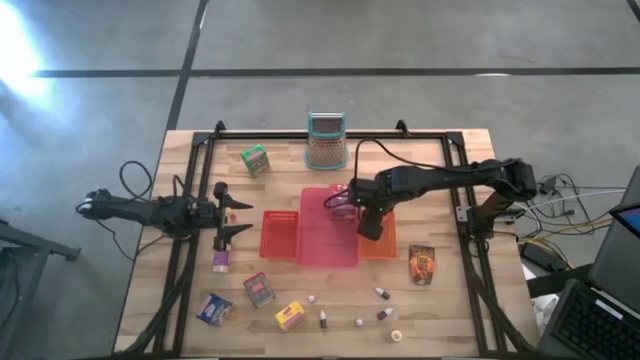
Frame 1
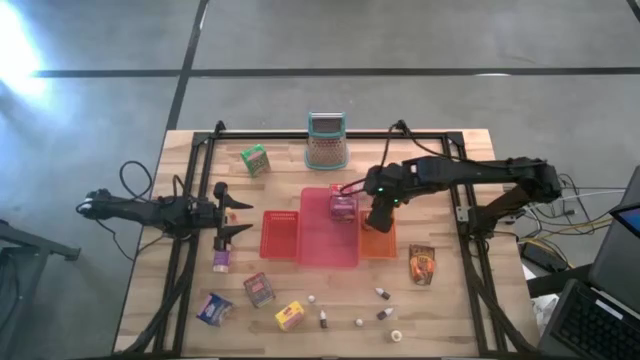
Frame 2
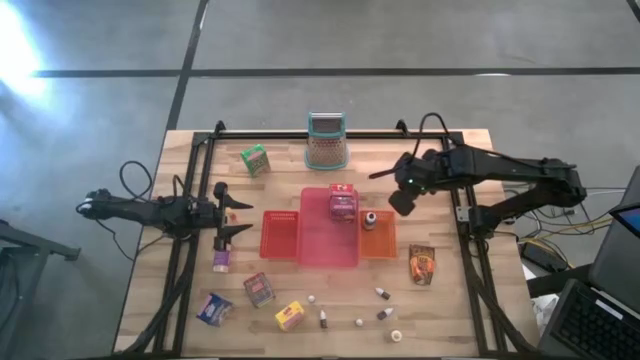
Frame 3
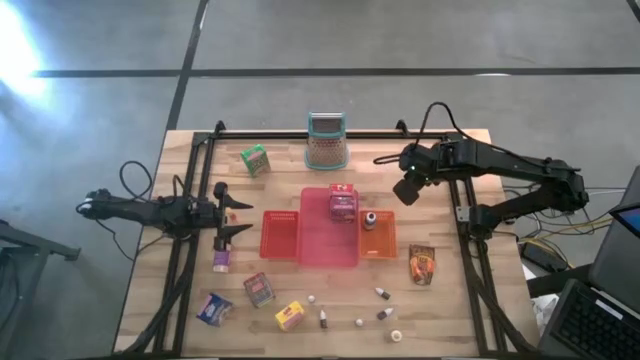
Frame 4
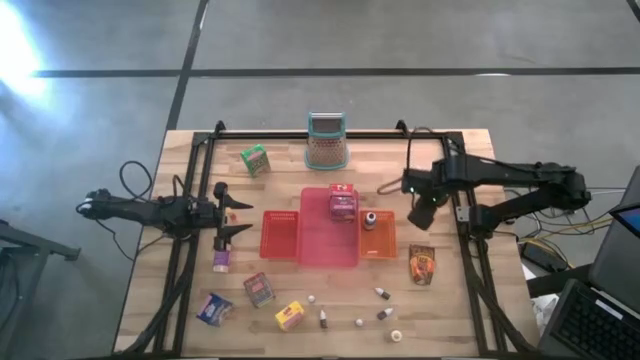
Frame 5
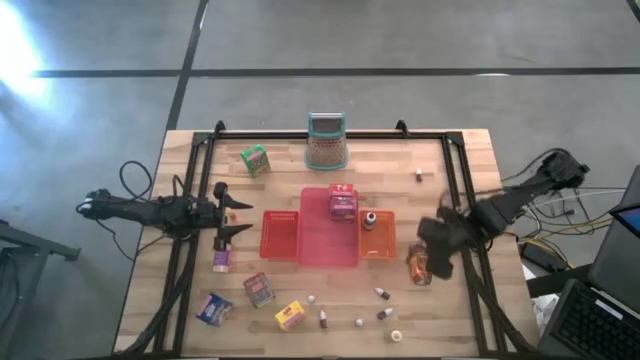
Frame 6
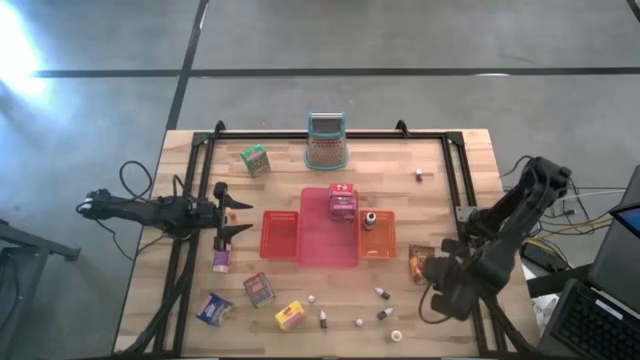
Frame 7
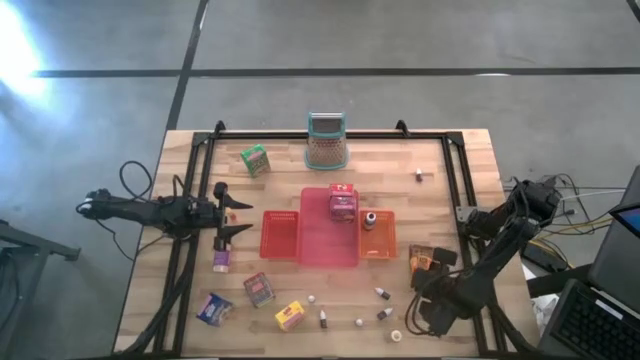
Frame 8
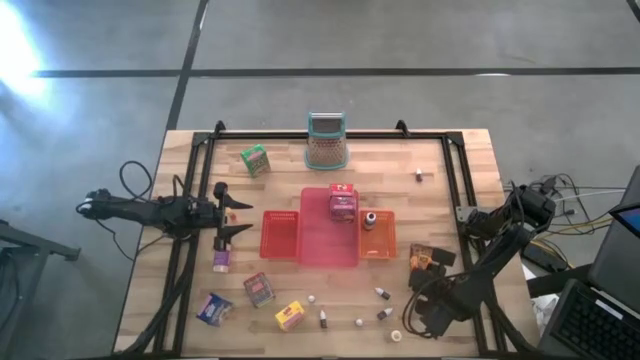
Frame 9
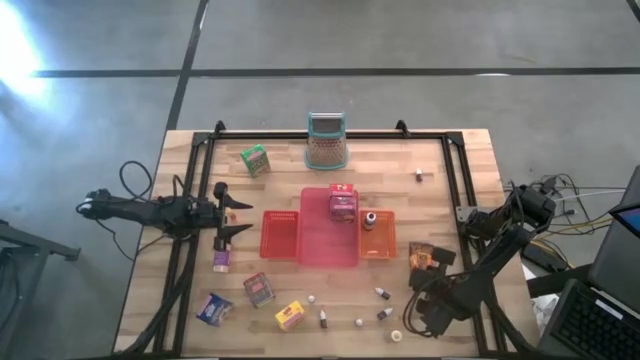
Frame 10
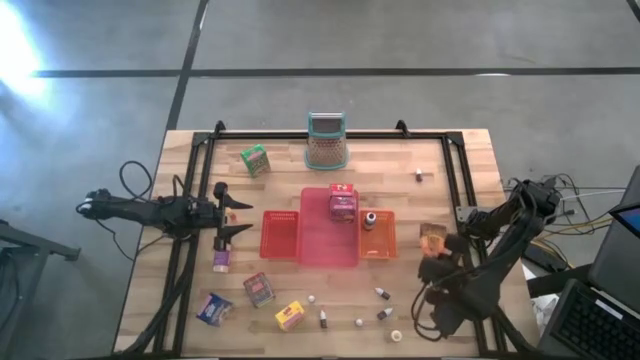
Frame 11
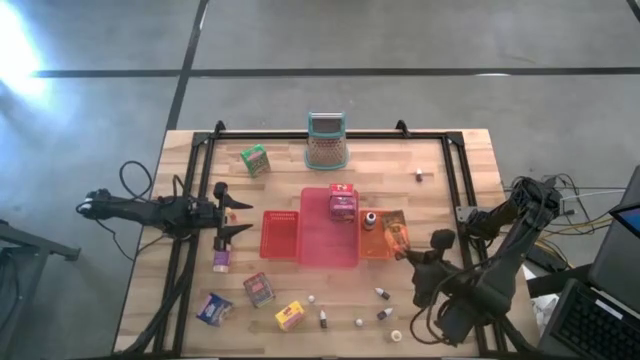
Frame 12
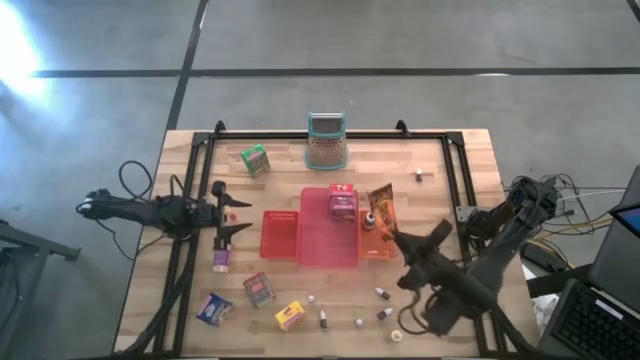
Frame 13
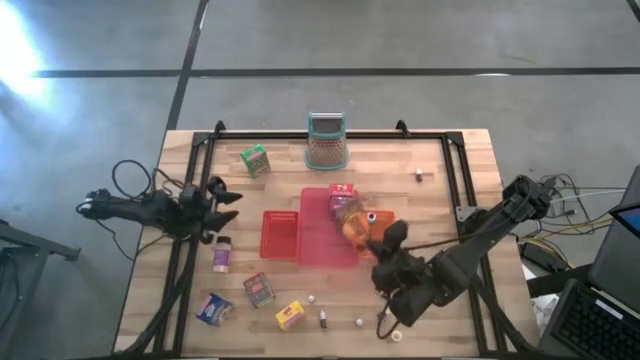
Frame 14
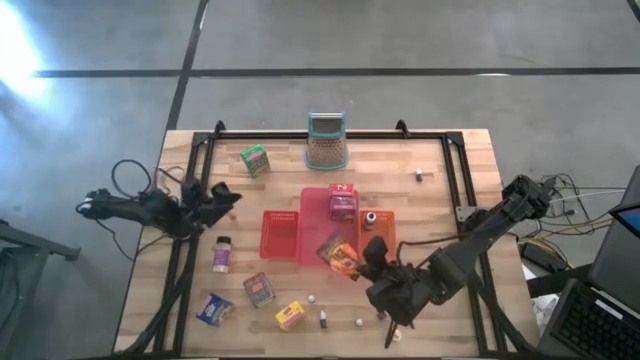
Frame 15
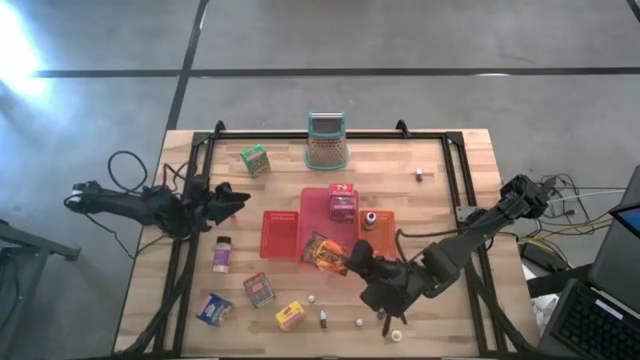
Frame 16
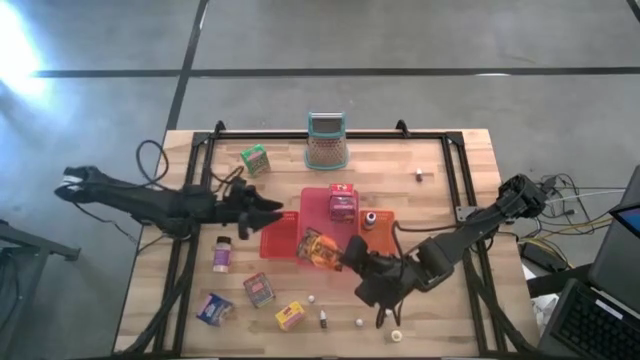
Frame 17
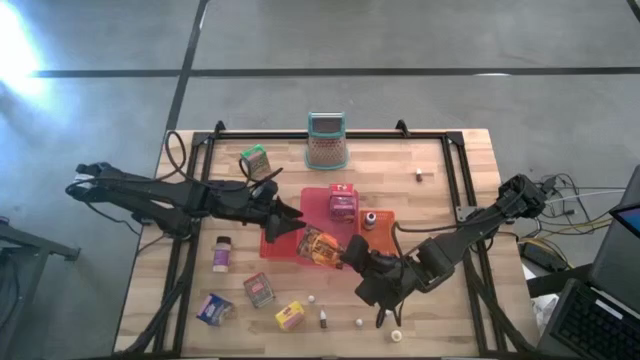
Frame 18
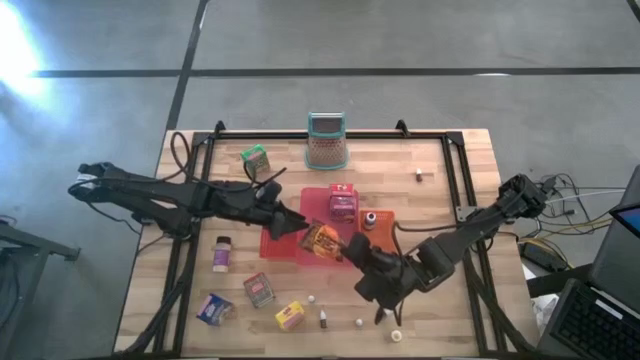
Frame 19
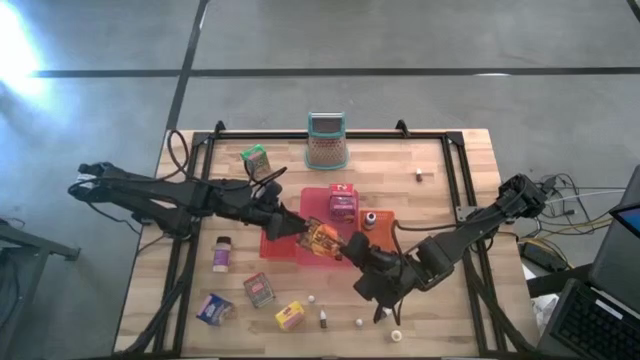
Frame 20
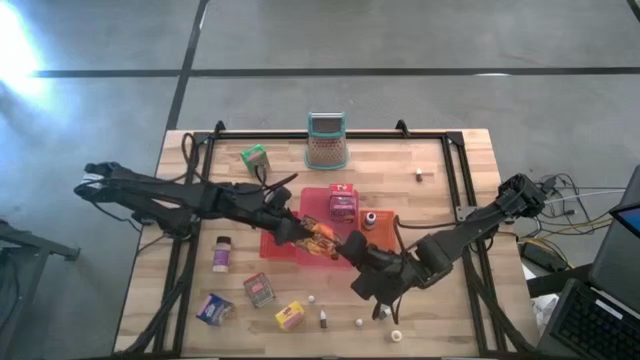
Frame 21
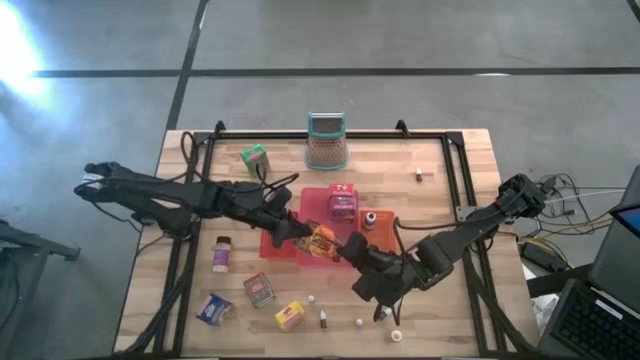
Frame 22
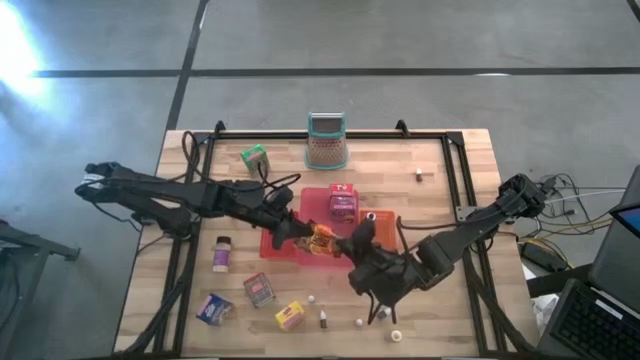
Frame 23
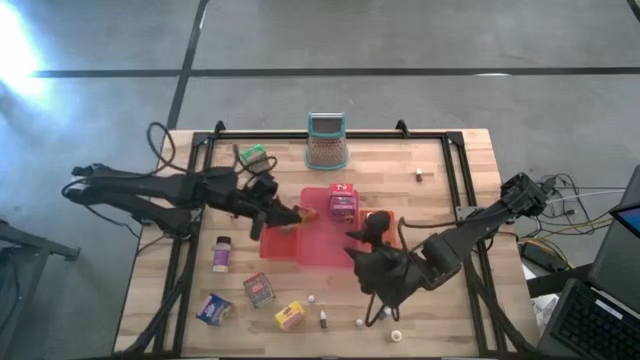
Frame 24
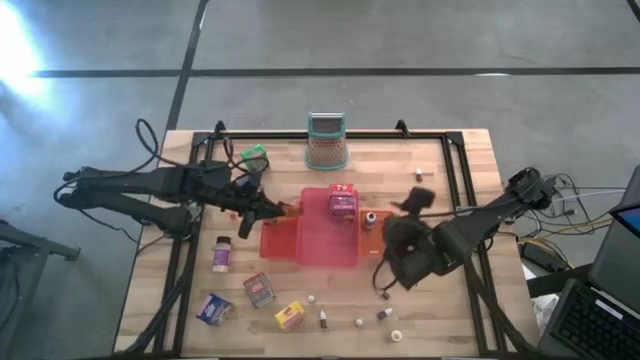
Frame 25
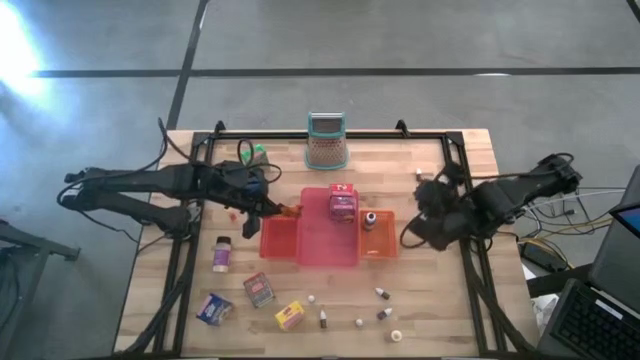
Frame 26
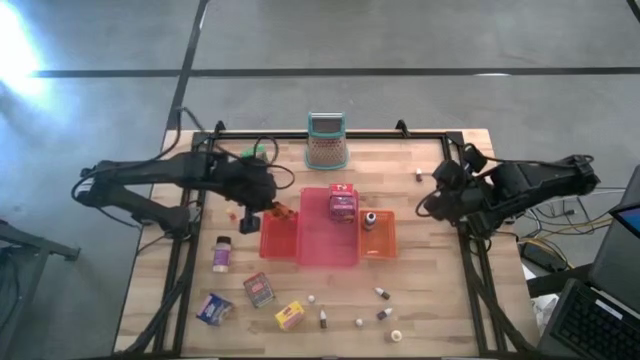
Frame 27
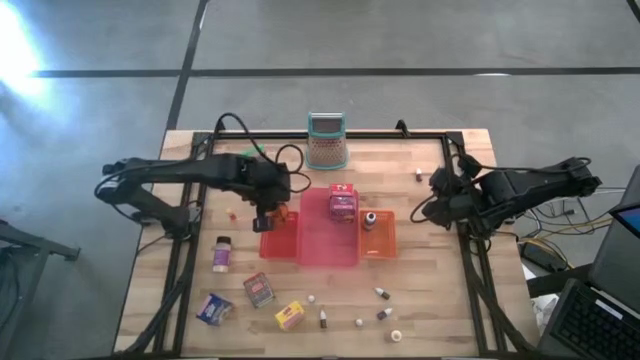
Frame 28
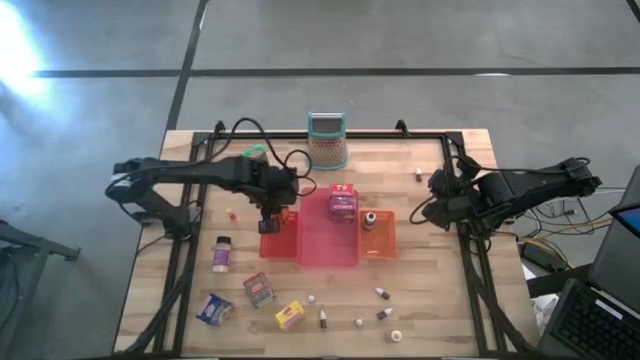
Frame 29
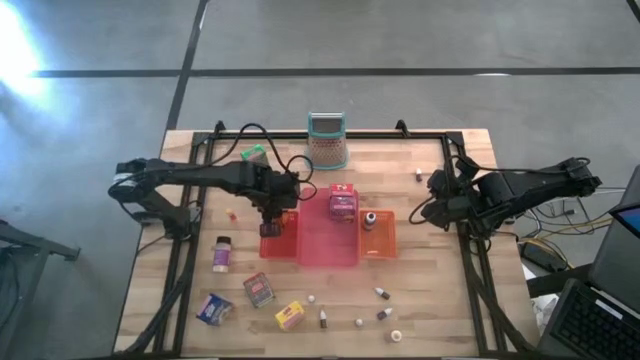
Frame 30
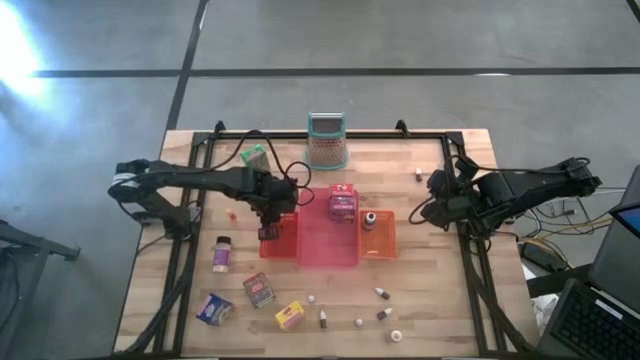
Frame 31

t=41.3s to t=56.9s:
Task: Pick & Place Kitchen Items
Put the orange seasoning pack into the red bin

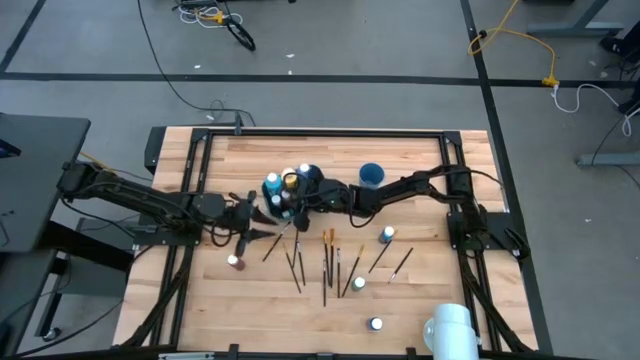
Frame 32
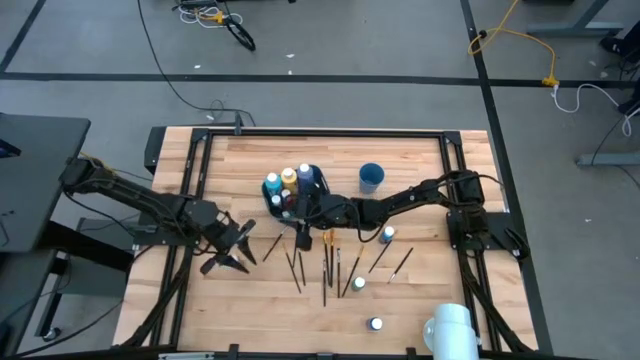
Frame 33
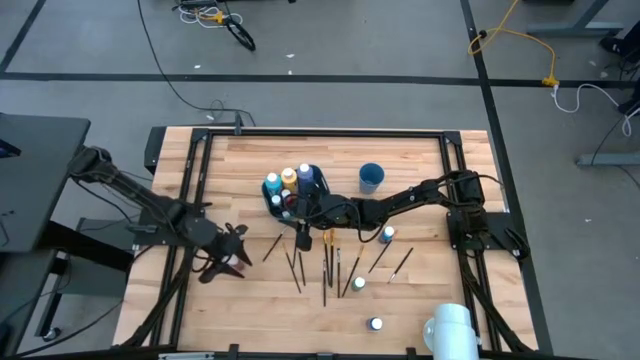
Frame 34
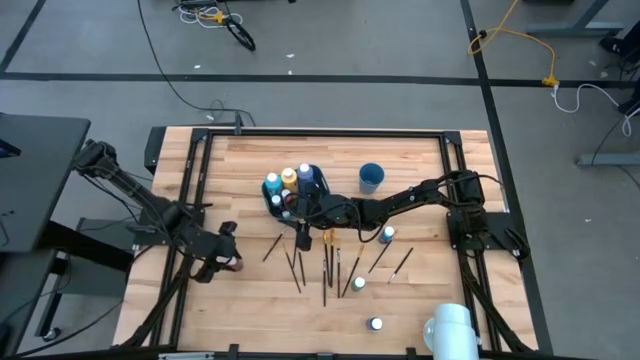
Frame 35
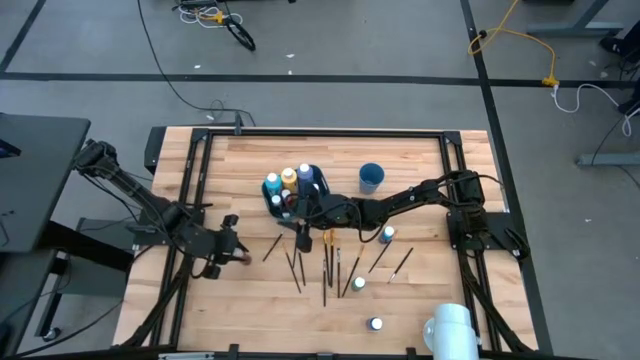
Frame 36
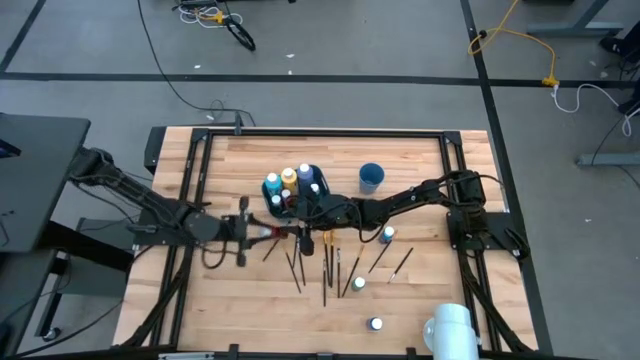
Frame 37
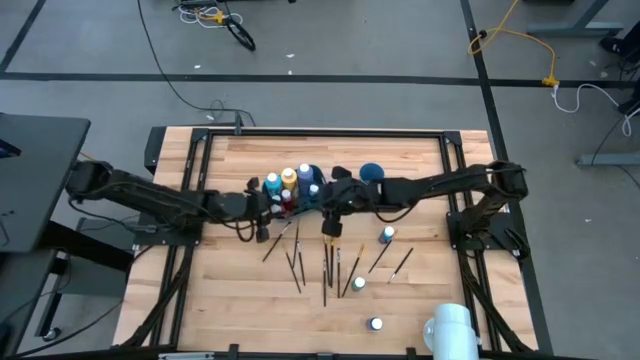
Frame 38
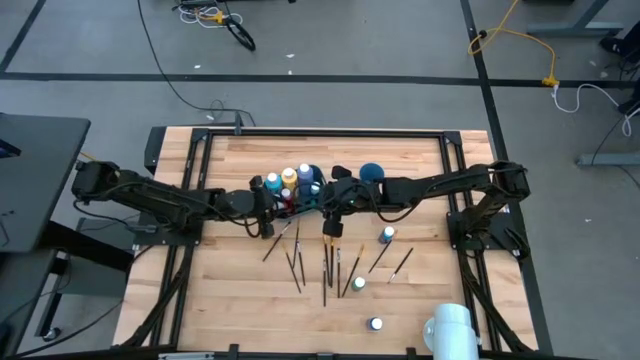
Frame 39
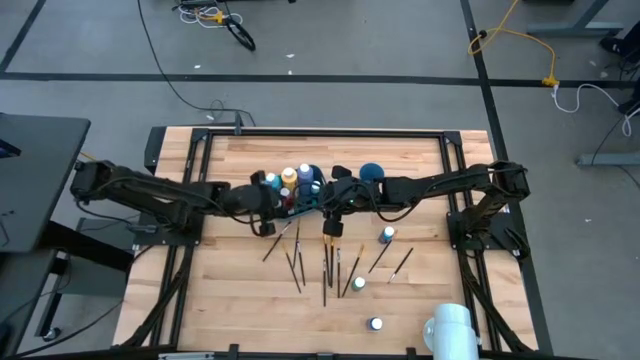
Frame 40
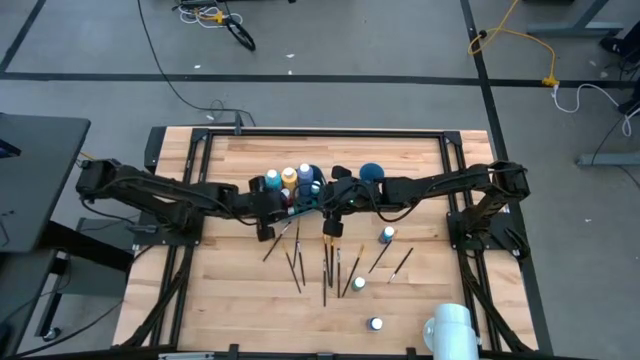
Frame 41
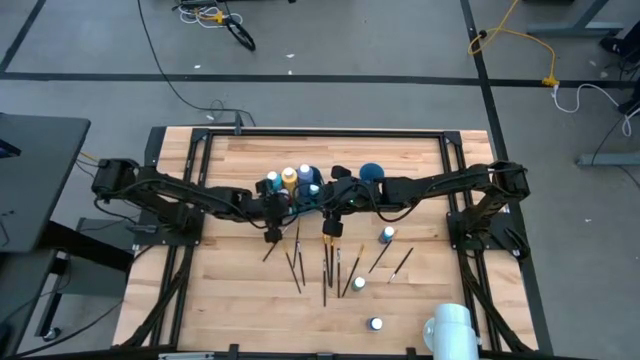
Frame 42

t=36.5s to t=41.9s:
Task: Pick & Place Paint Supplies
Put the red paint bottle into the blue bin
